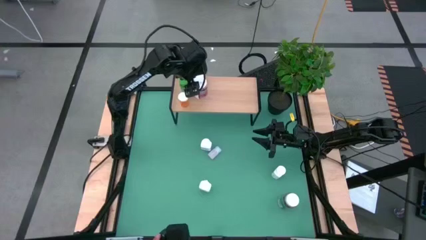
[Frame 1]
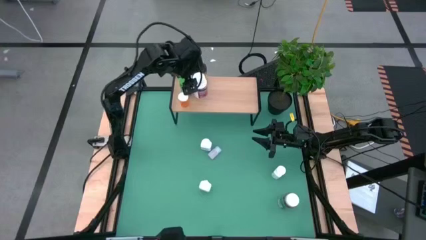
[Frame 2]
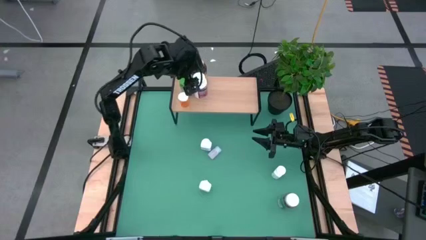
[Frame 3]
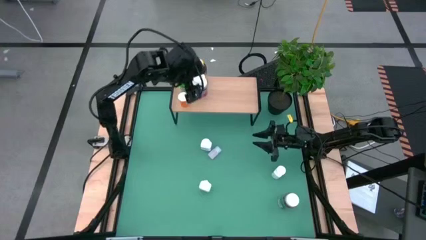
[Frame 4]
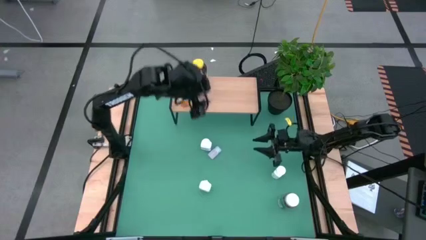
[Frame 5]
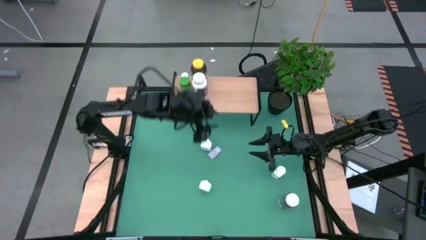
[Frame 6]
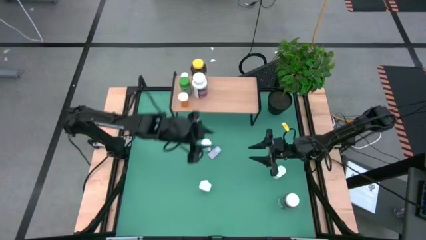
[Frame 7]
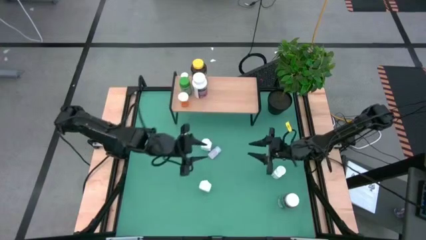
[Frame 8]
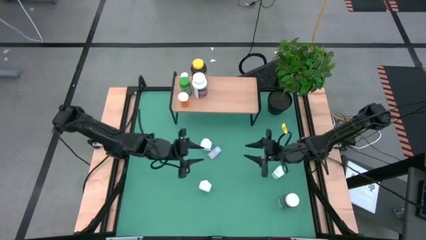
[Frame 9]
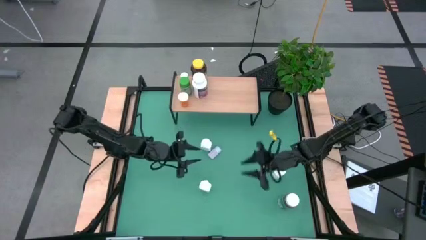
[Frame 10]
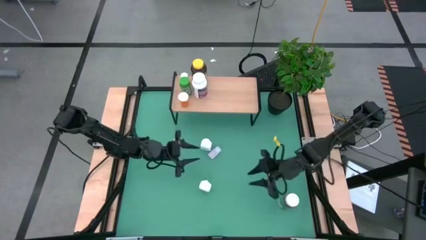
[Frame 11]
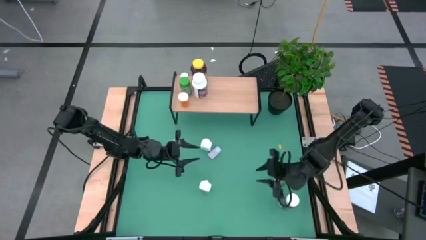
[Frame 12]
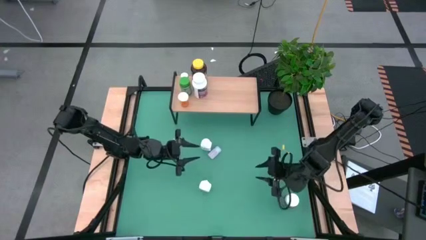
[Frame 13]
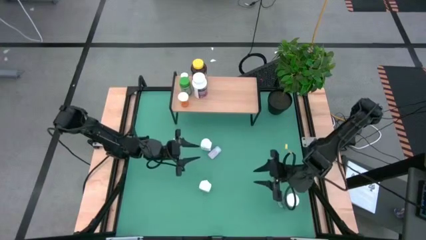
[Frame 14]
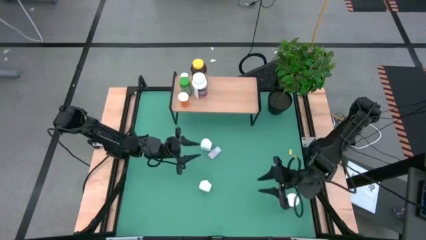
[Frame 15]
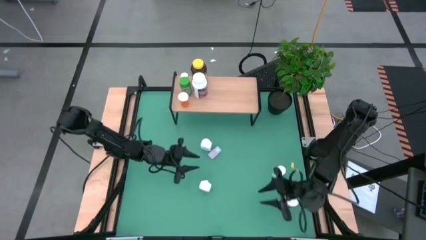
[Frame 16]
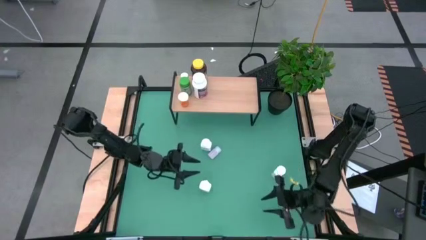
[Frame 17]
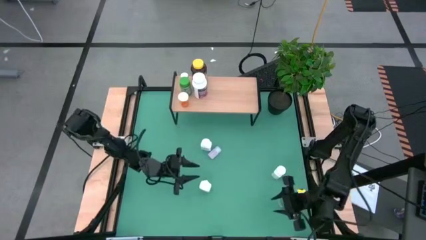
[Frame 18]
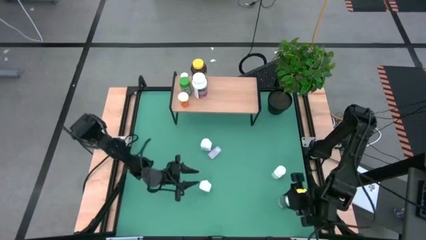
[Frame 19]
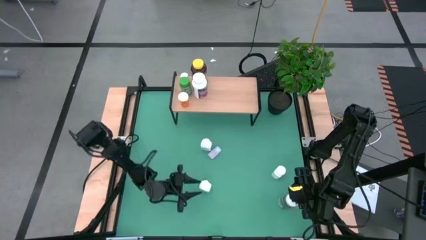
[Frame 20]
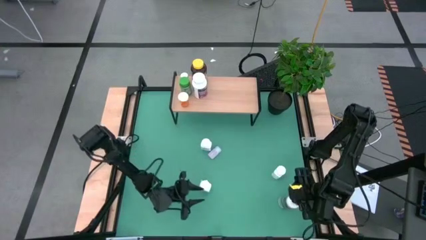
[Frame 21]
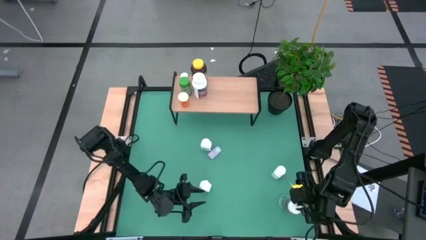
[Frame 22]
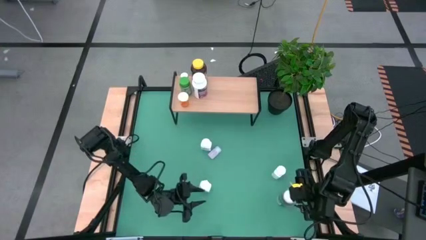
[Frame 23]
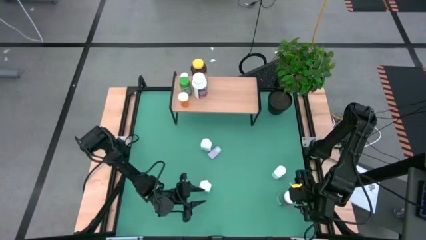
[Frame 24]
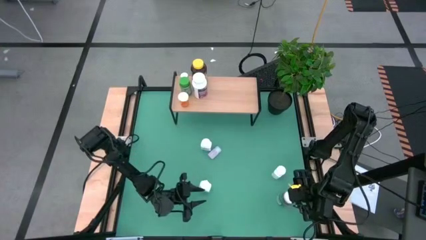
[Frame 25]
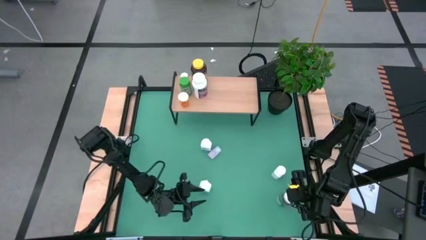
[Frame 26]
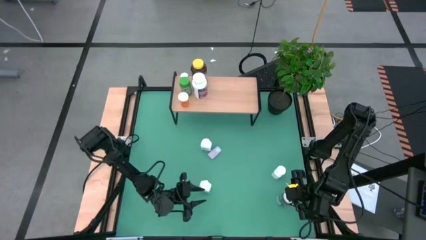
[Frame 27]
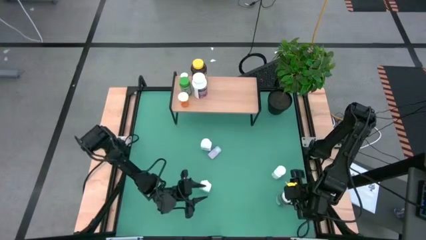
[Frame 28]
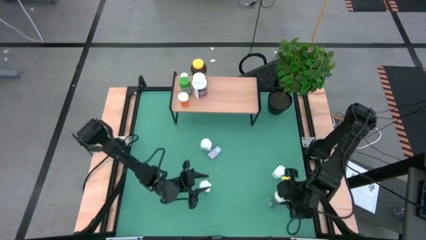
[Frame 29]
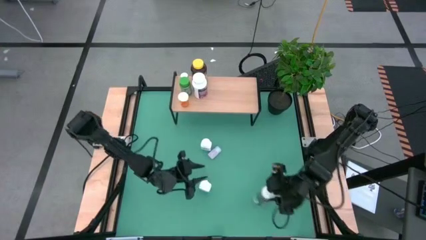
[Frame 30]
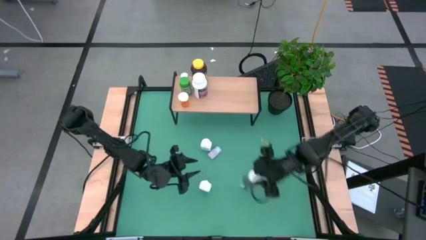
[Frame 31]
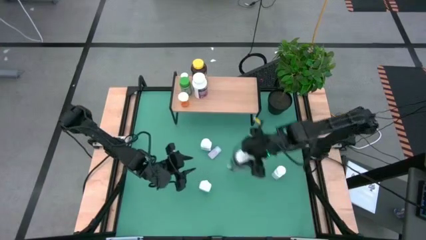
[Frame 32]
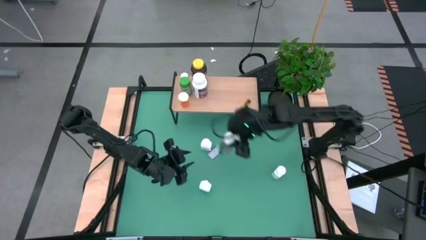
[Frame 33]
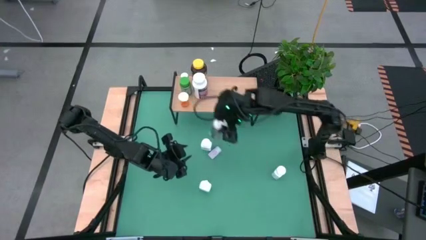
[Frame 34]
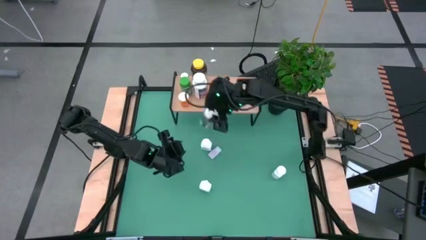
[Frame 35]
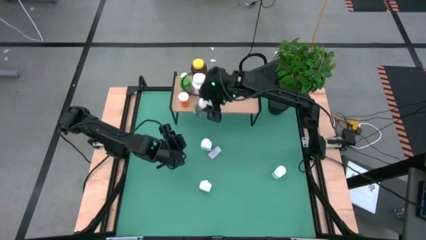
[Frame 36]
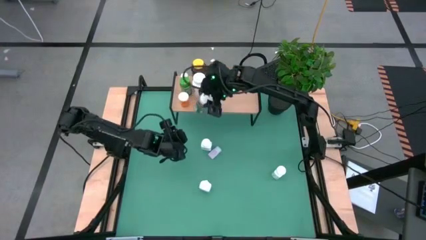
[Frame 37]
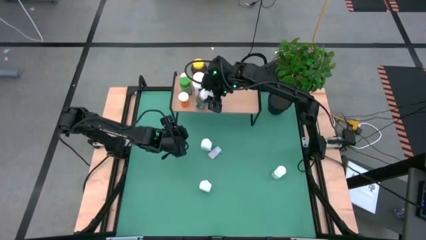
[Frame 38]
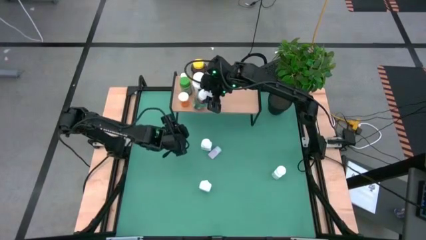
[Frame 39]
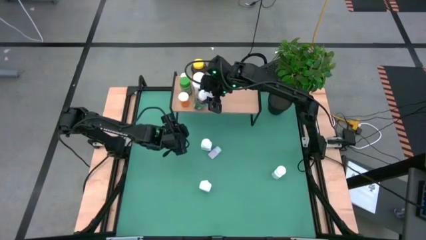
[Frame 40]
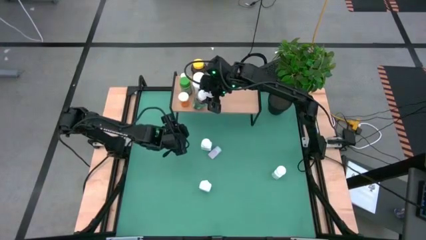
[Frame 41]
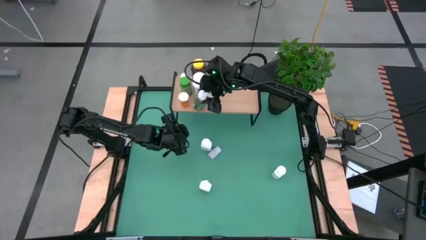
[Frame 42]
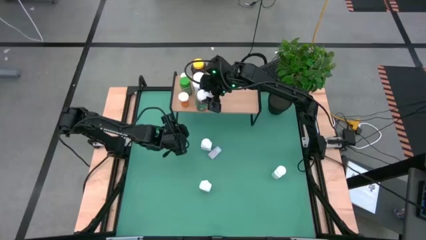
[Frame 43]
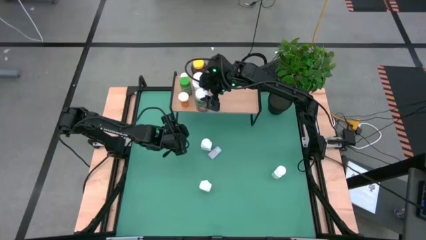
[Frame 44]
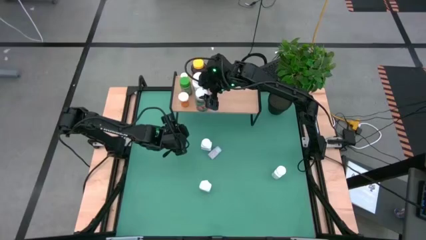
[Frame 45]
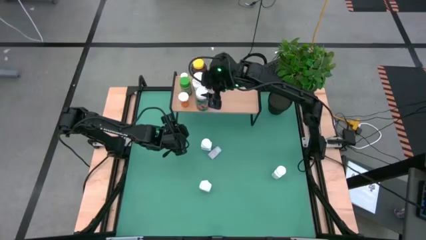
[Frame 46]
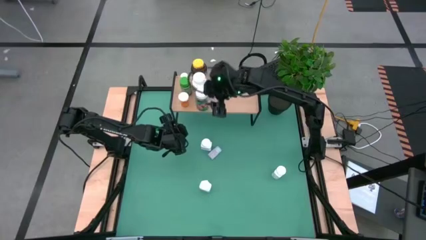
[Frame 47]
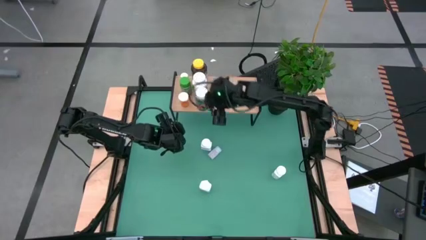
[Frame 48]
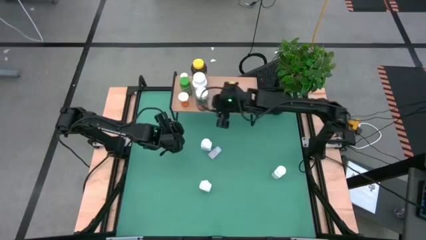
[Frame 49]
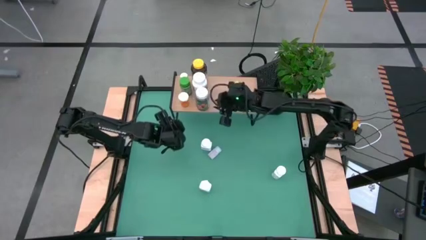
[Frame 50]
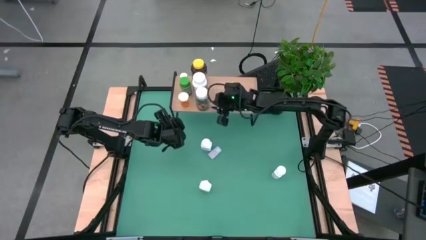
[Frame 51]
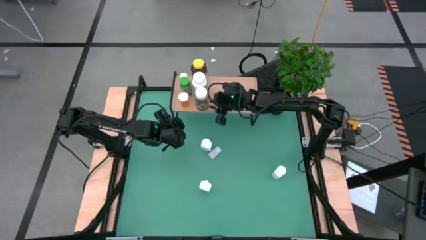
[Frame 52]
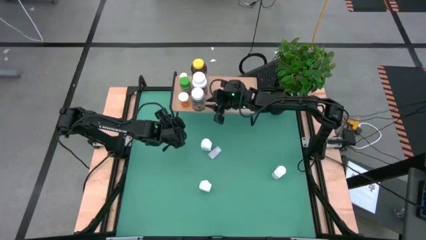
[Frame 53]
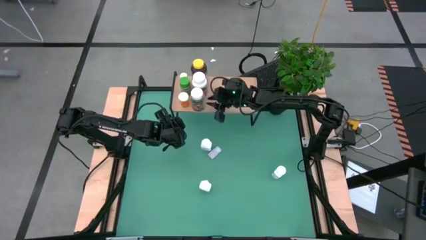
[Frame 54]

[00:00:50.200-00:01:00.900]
Task: Pick and place medicine bottles onto shelf by color
Put the white and green bottle on the shelf

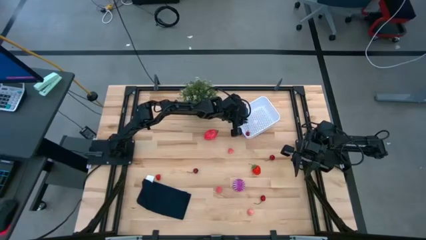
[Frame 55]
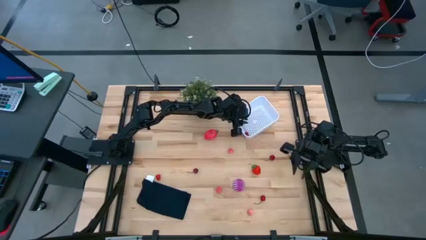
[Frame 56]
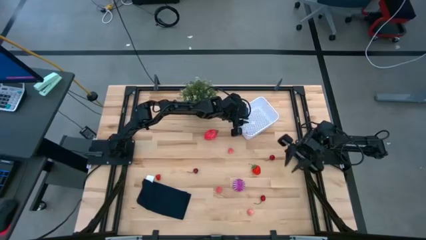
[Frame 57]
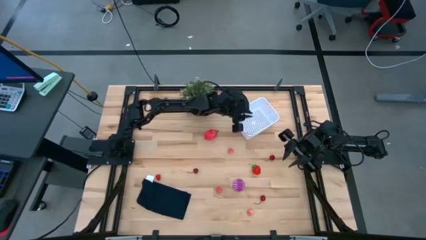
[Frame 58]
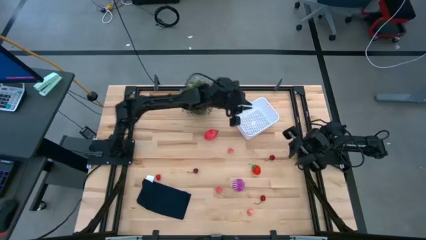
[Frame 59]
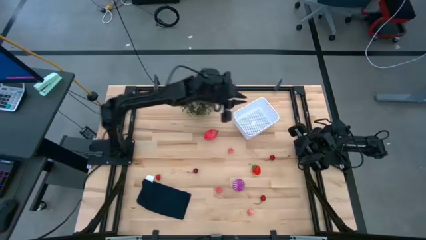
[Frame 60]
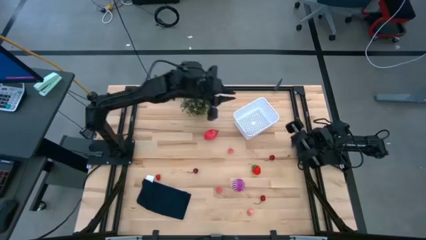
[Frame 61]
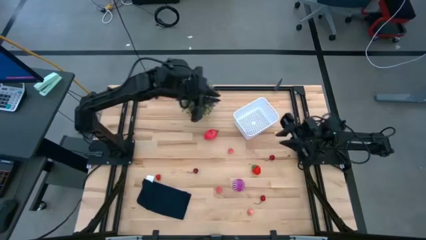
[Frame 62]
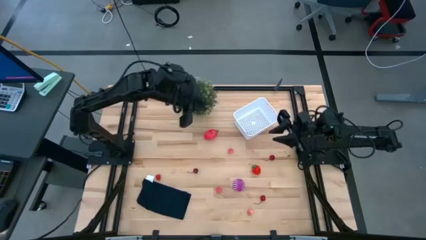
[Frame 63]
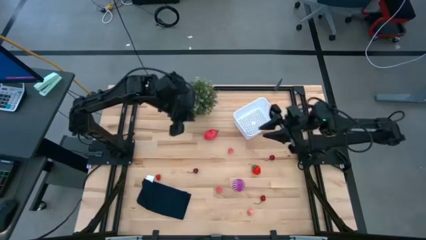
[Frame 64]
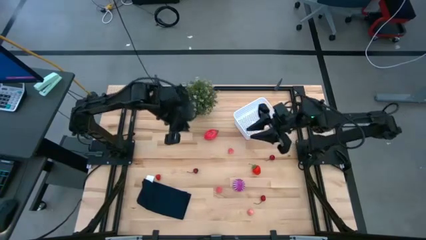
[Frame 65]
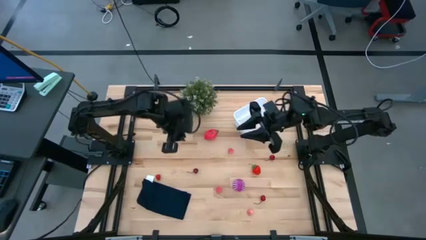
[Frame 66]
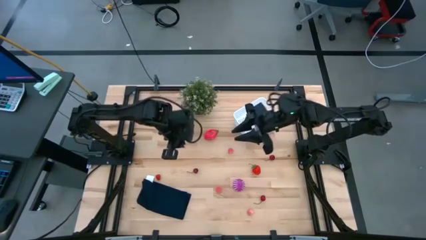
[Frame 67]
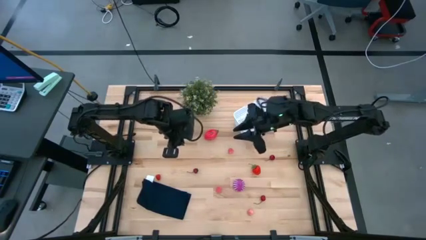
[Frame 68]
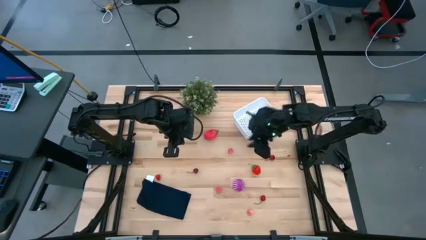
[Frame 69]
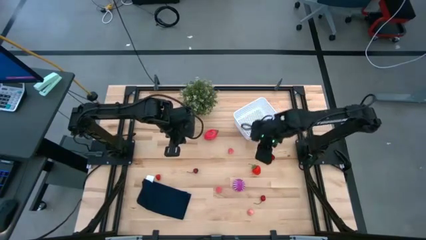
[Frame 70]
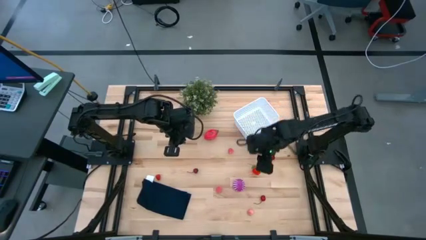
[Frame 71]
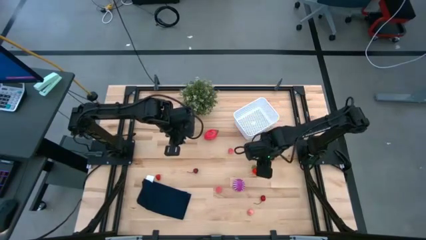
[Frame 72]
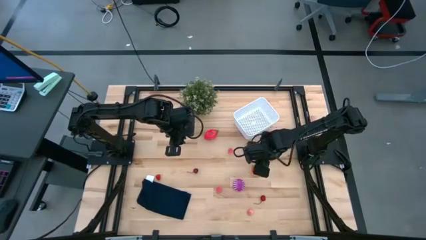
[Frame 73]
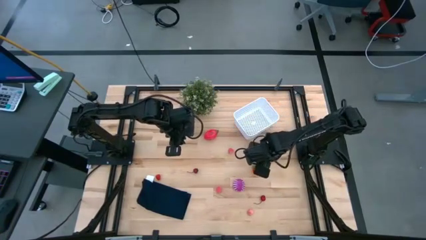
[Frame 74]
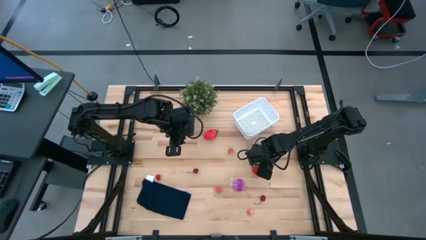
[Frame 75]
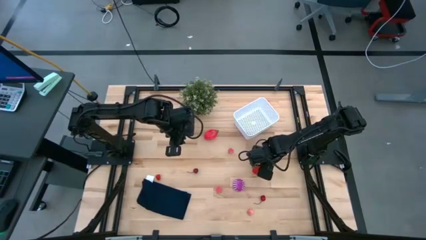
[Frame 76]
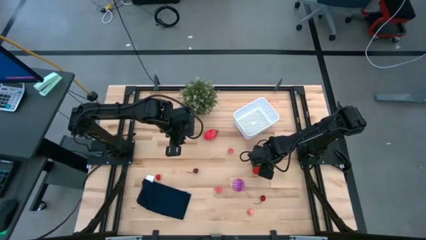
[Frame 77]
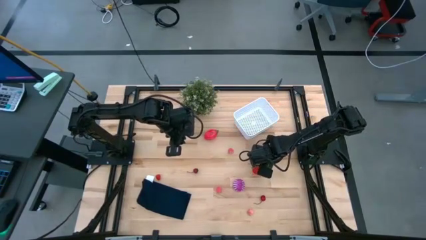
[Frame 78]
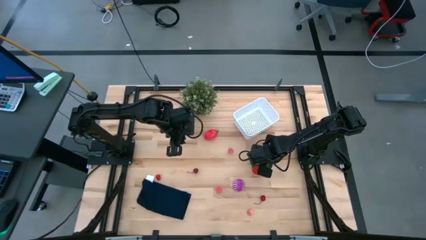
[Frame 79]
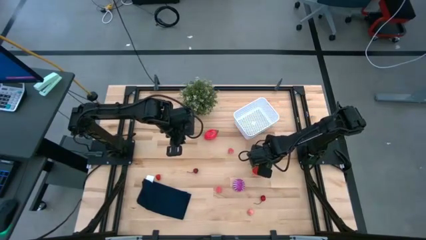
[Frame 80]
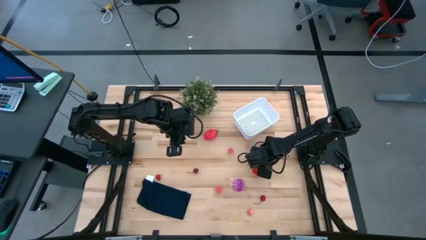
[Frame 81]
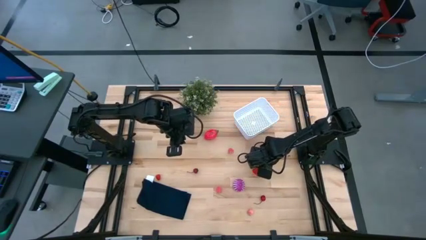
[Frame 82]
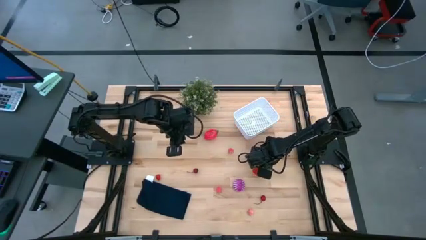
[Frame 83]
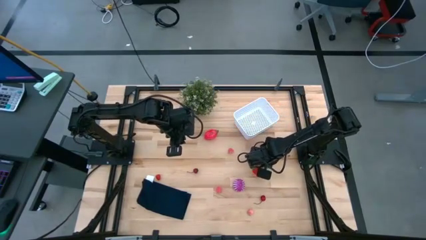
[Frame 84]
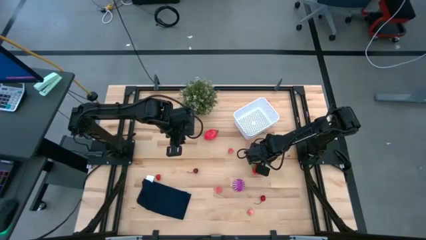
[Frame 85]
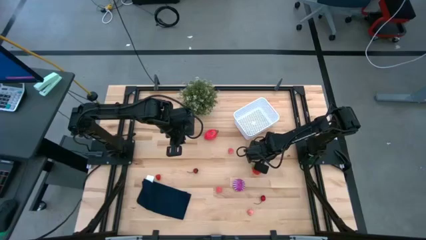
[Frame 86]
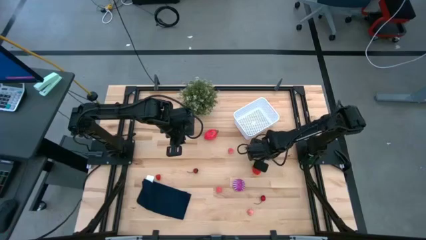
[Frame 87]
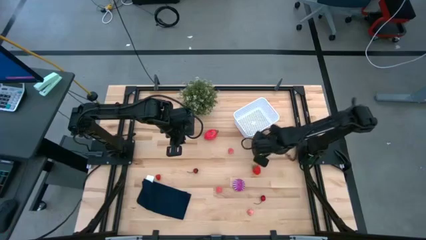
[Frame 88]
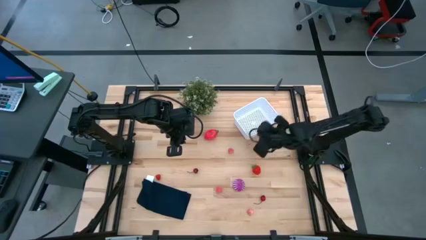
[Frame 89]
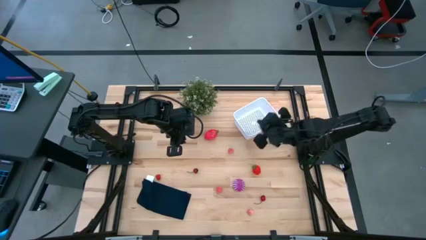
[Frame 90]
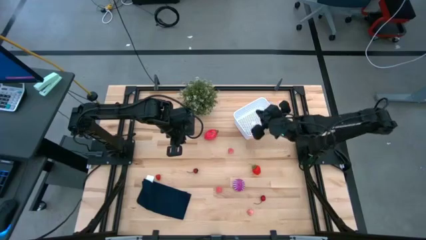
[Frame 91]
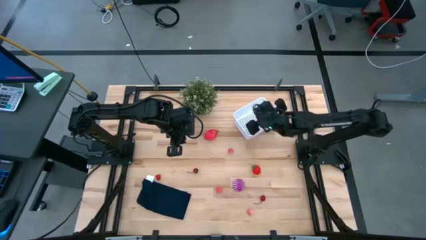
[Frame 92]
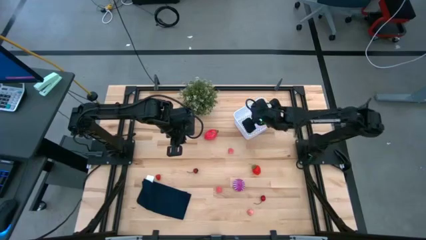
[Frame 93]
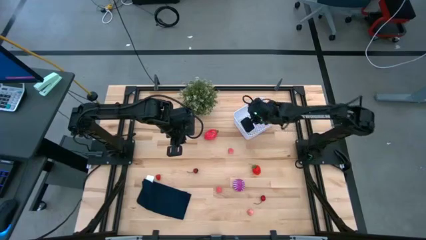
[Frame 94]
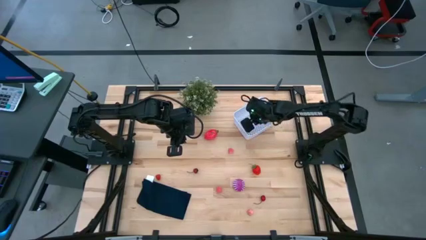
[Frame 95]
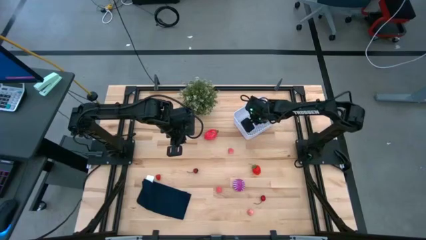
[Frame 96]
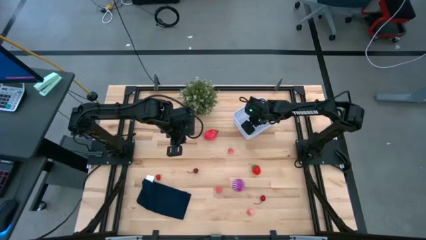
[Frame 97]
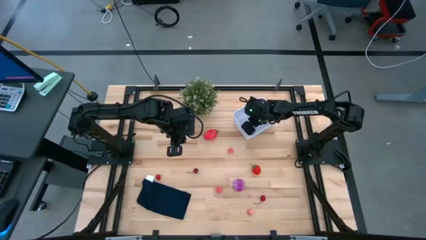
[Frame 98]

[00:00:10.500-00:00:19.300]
Task: Pick and placing Produce into tupperware
Put the top cherry into the bin
